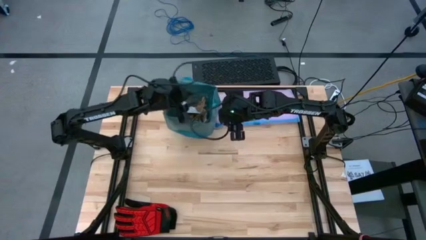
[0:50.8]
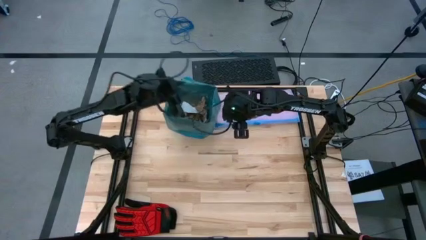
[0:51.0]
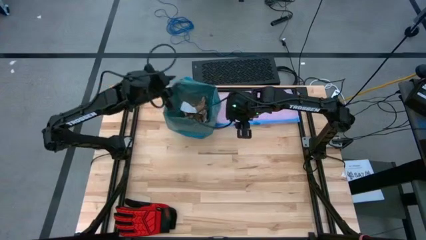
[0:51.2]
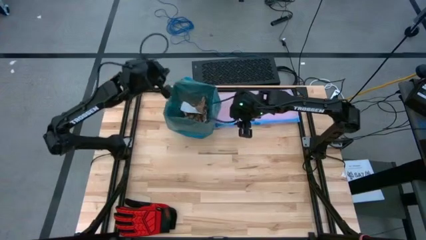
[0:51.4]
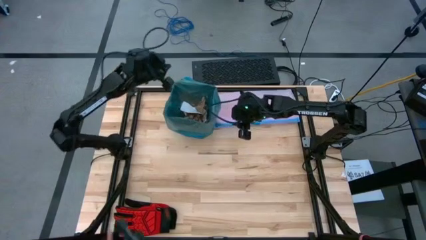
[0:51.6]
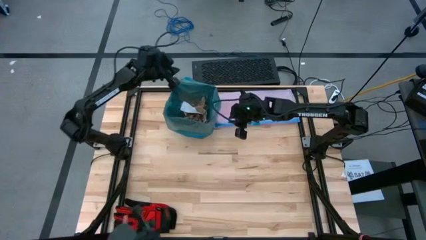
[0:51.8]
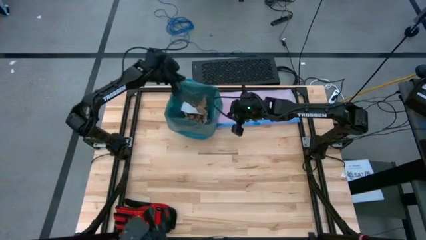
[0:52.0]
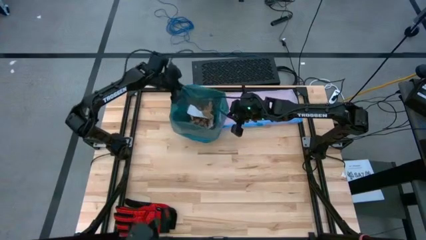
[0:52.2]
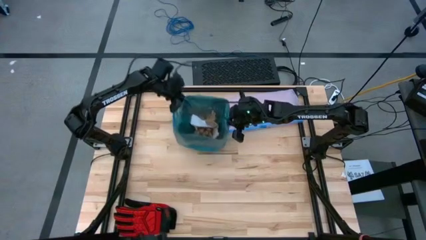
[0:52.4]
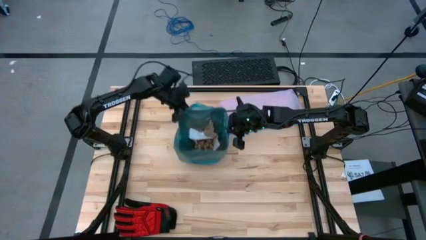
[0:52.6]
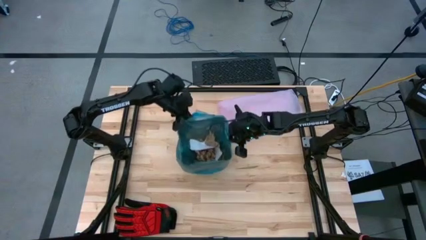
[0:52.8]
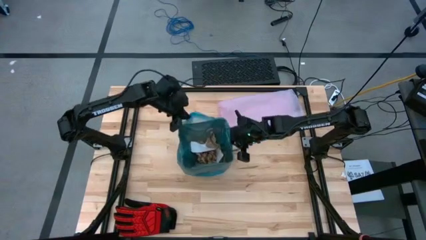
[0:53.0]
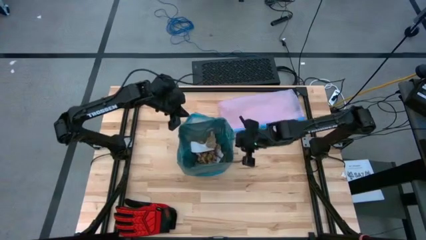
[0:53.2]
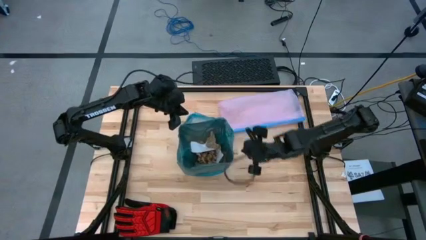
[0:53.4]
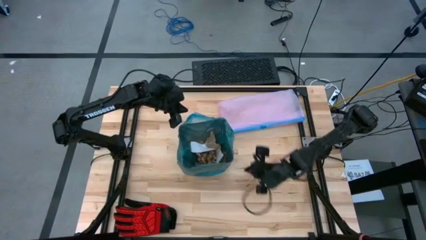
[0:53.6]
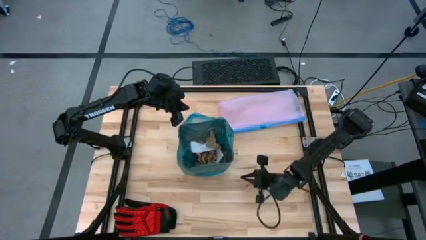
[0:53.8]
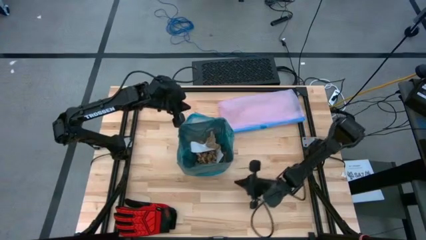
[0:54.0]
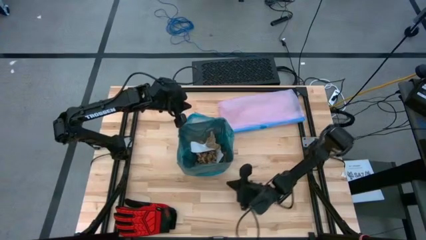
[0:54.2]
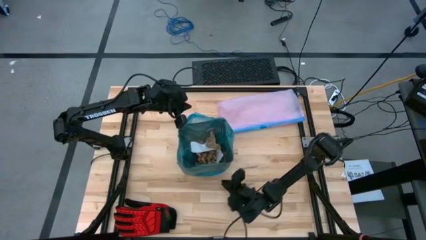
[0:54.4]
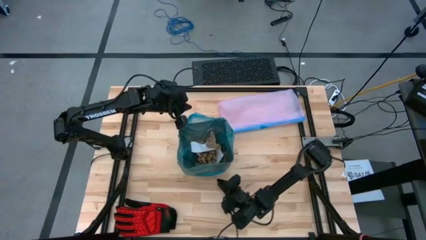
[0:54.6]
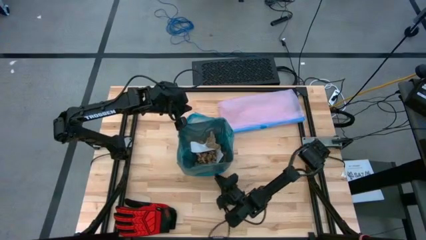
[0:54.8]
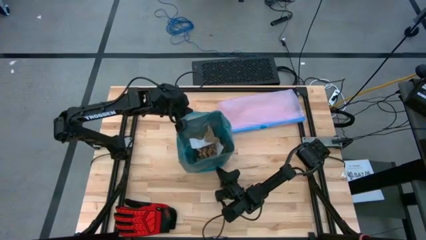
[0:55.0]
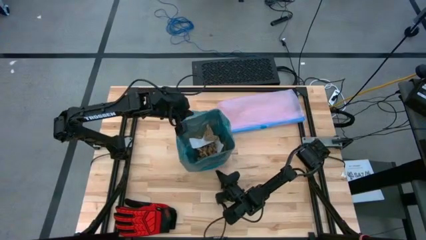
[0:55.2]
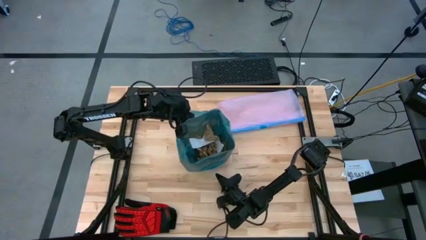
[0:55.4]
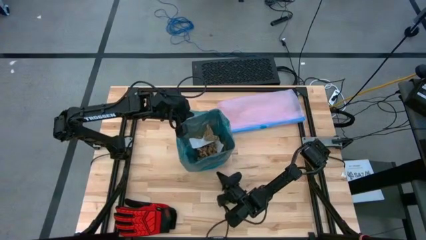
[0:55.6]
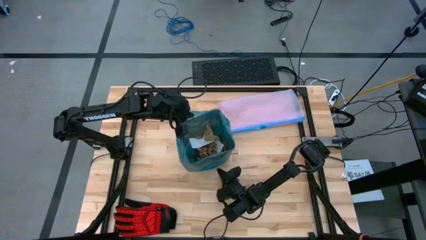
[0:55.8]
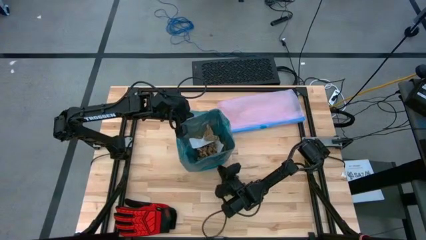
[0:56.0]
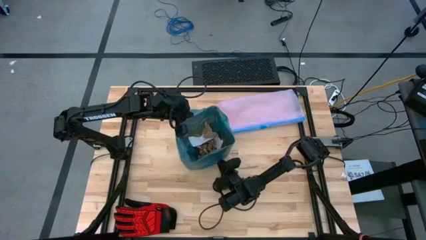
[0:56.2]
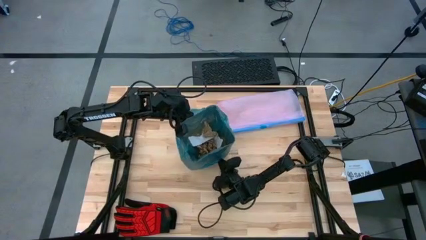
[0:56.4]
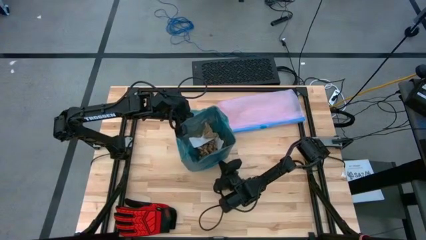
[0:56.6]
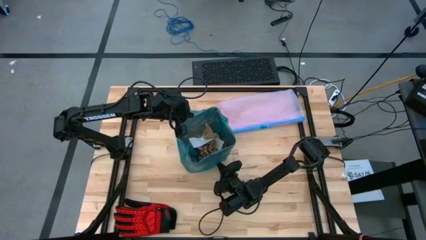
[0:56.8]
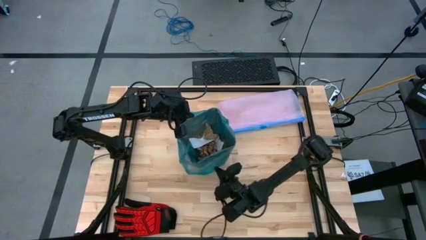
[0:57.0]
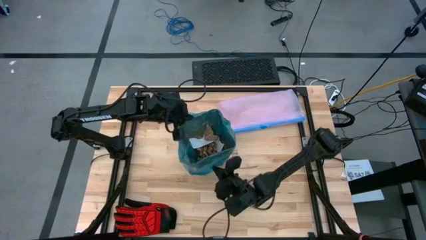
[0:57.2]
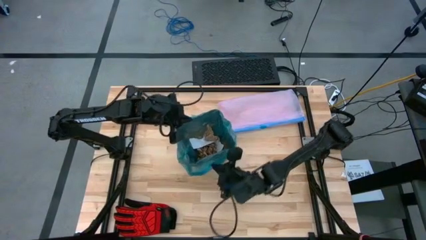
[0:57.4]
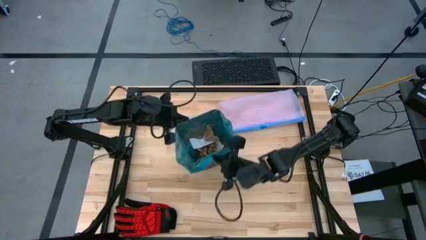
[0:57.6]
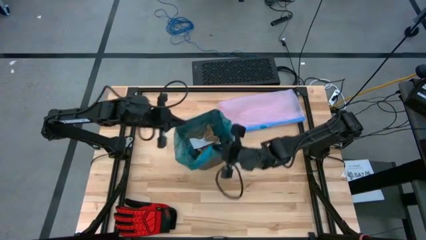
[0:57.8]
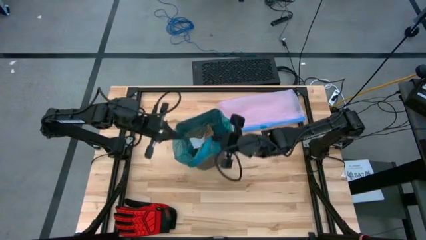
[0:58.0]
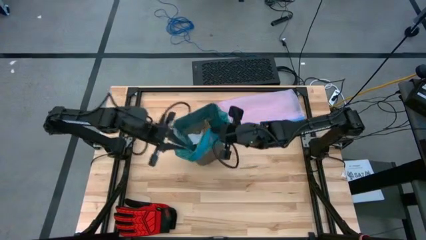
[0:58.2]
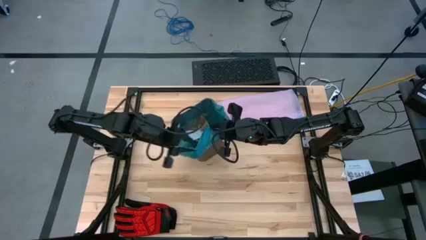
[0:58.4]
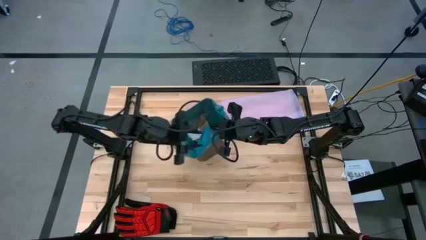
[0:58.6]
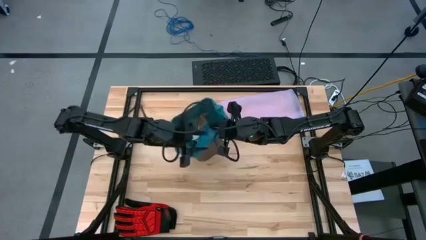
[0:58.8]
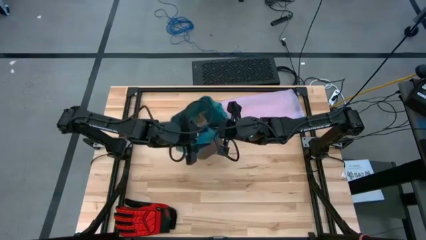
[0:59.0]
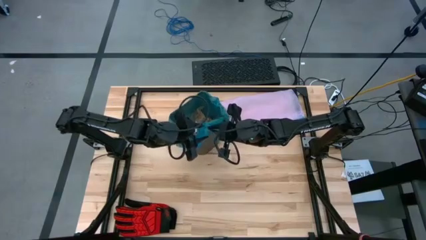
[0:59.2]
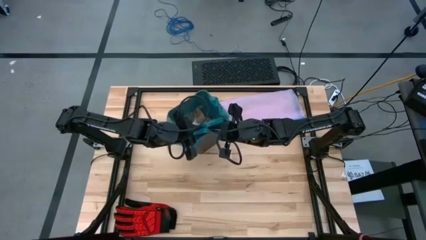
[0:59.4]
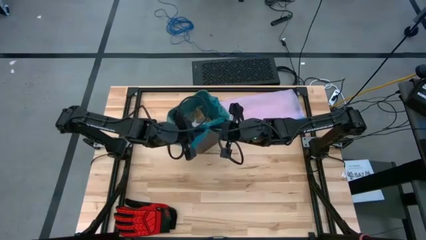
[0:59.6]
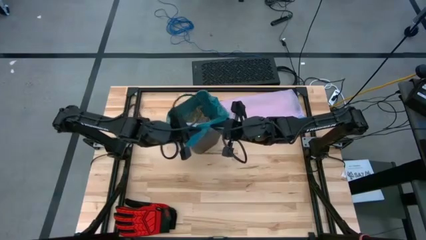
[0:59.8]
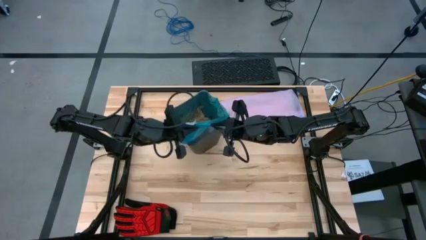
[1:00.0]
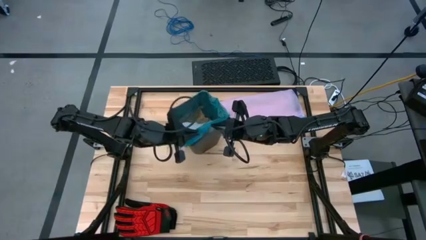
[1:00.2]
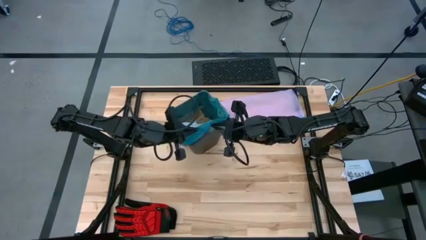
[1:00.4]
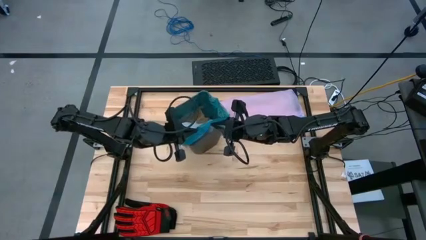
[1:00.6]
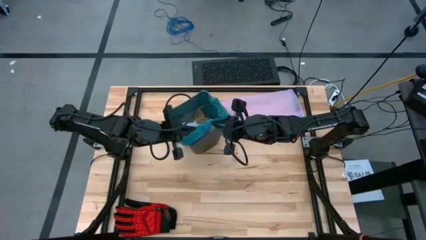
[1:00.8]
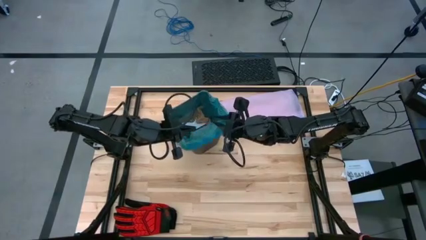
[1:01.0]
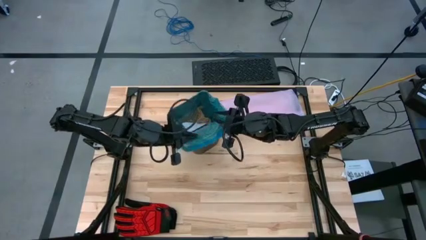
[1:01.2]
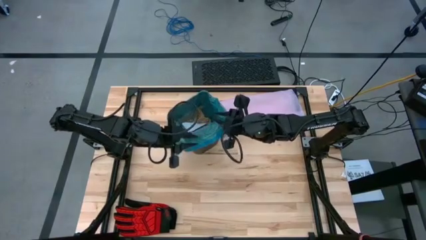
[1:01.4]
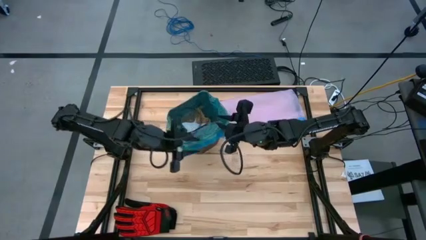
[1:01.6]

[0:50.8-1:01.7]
Task: place trash/remove bag and relplace
Close the trash bag

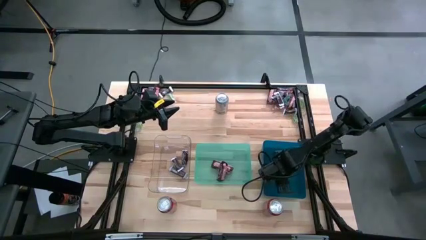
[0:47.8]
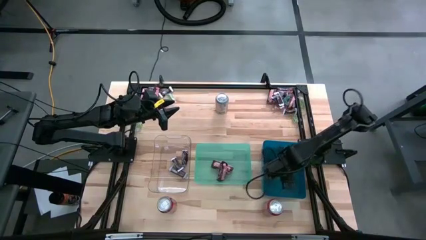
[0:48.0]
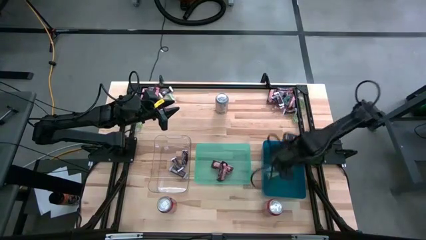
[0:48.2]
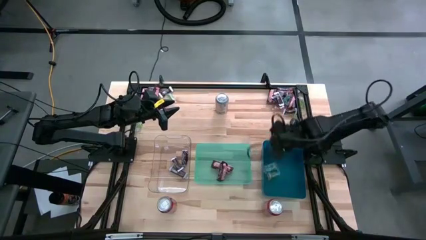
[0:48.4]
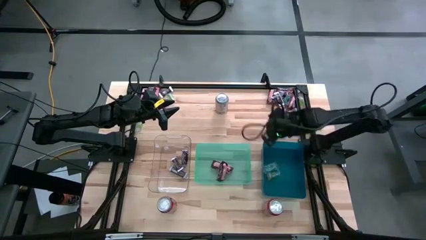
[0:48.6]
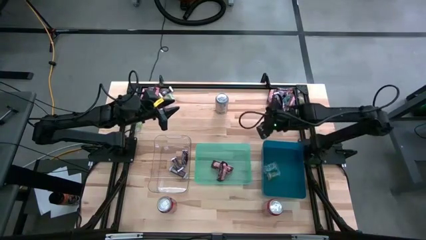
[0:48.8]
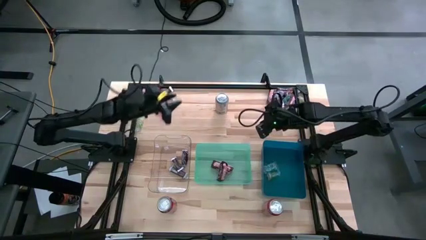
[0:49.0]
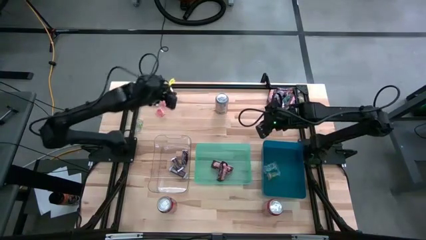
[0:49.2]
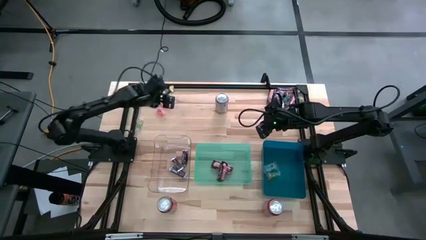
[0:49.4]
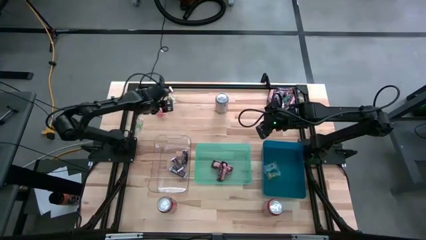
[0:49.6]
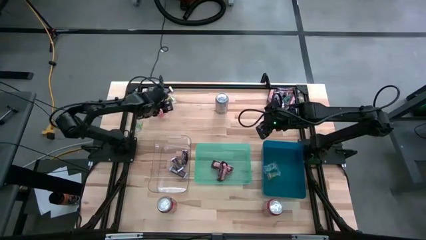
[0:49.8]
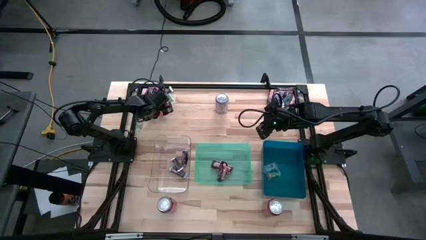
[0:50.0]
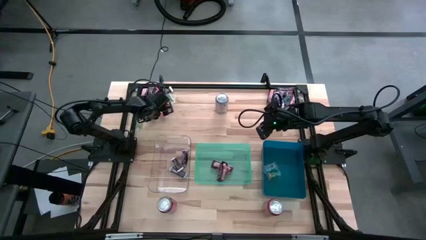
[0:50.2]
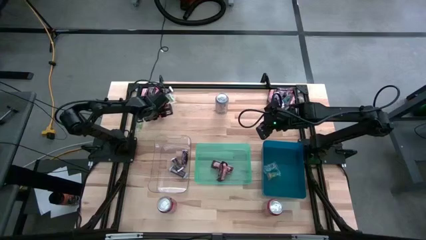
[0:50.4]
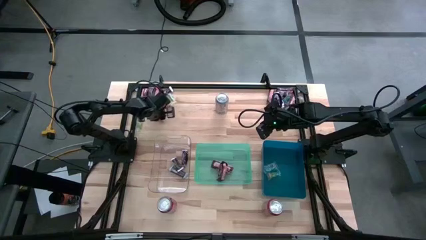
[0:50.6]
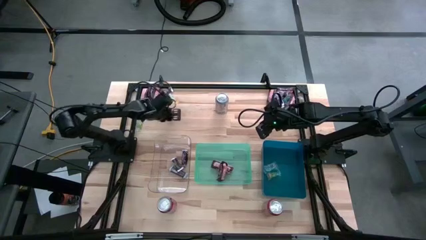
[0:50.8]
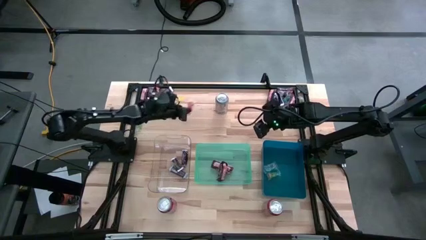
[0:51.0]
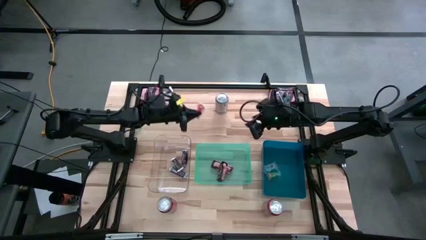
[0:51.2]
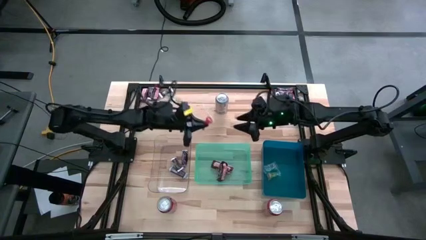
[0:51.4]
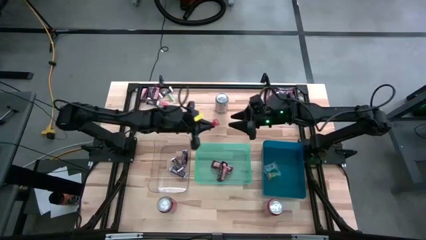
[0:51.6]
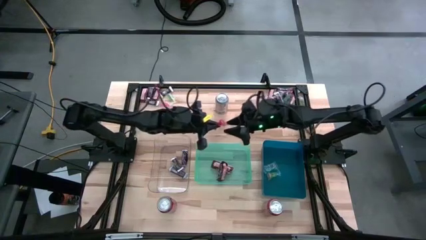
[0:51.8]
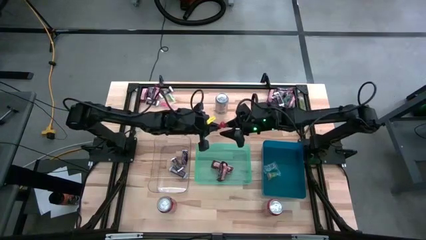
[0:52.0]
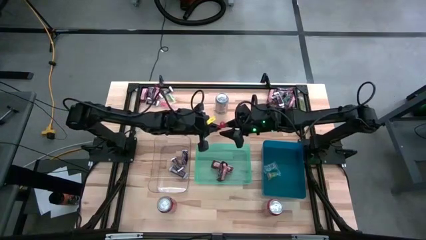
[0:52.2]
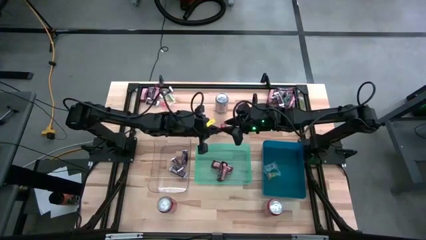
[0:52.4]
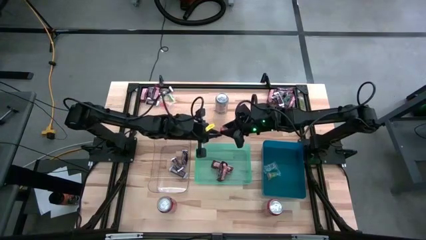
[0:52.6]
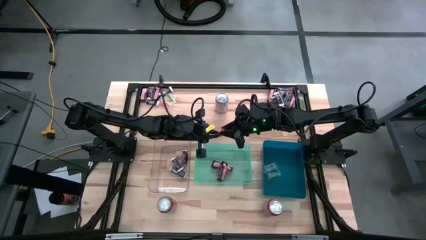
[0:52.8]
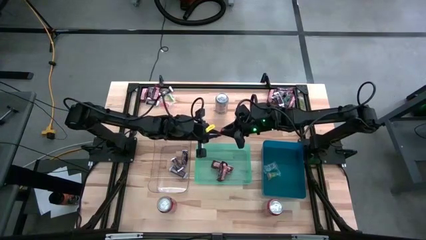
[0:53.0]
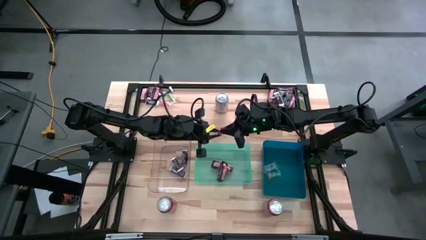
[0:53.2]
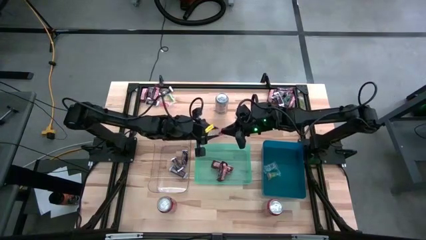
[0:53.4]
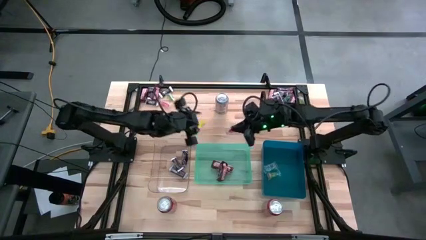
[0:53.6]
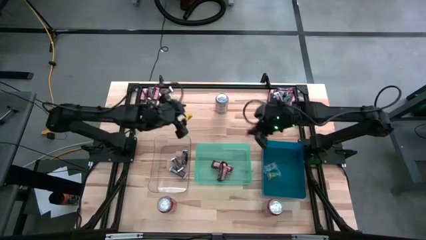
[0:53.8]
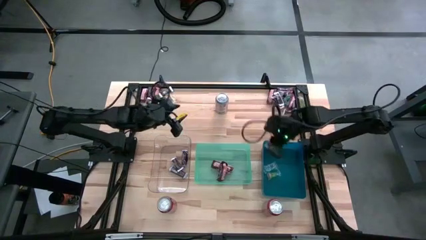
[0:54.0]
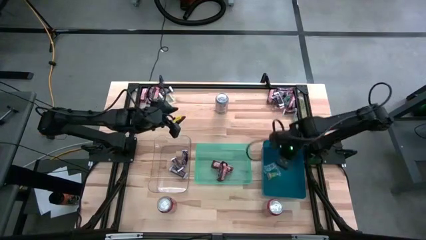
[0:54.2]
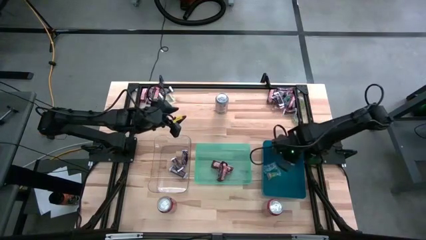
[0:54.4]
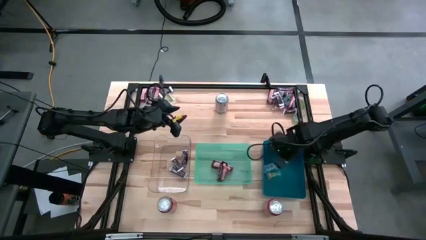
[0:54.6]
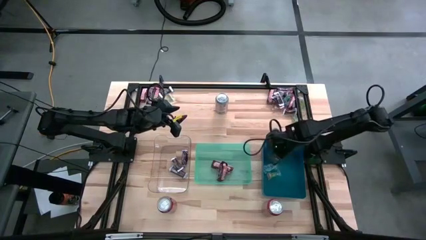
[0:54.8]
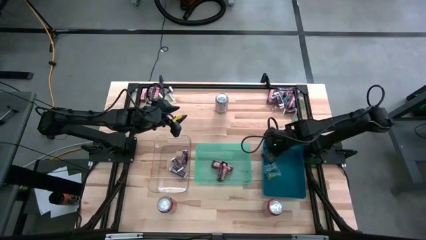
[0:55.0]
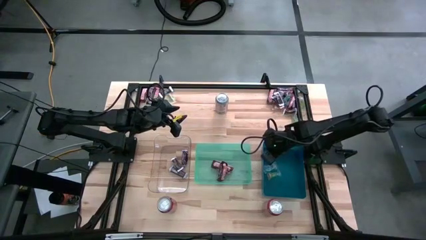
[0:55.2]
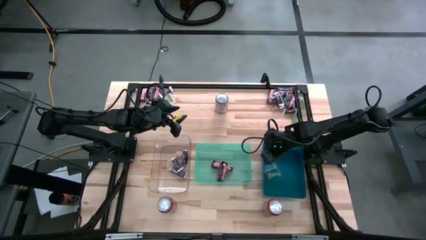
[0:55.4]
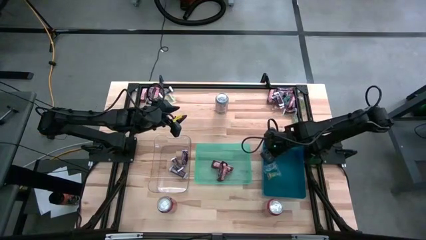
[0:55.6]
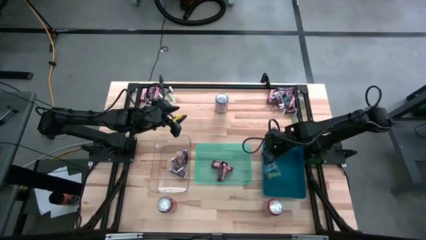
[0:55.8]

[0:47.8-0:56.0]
Task: Organize candy in baskets
Put the red gummy into the blue bin
